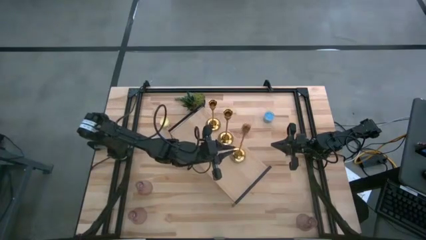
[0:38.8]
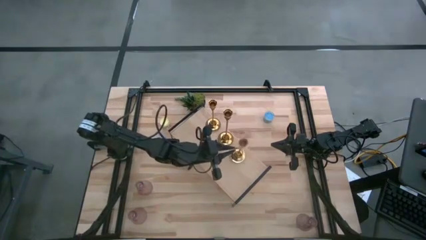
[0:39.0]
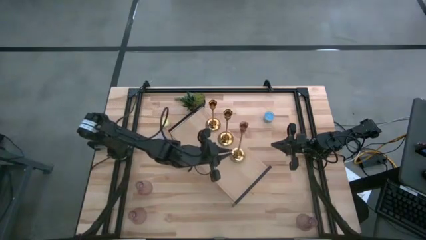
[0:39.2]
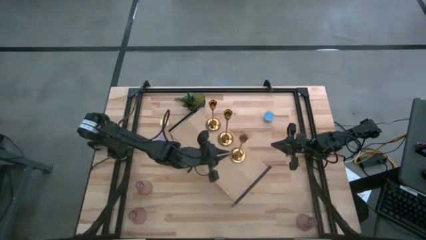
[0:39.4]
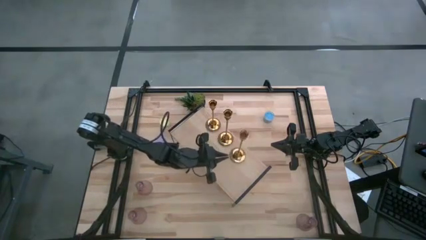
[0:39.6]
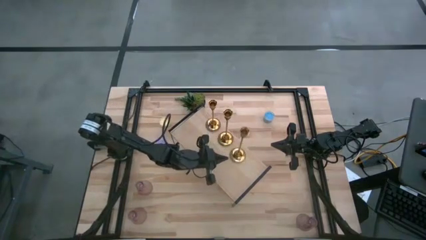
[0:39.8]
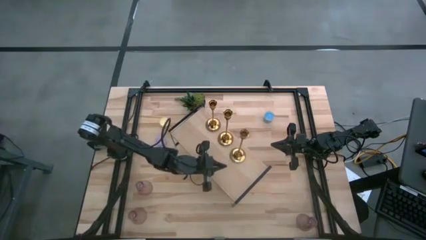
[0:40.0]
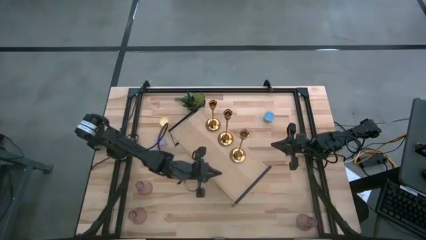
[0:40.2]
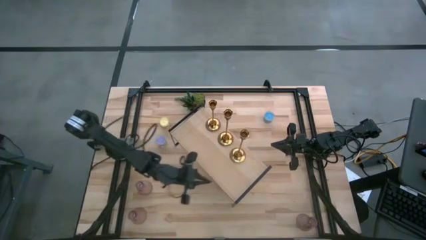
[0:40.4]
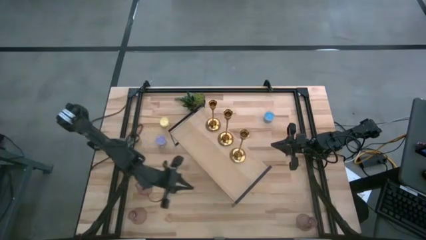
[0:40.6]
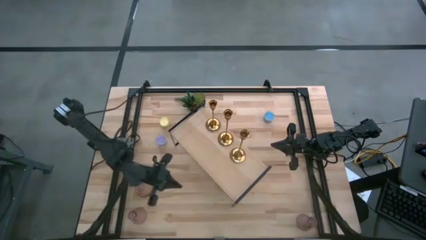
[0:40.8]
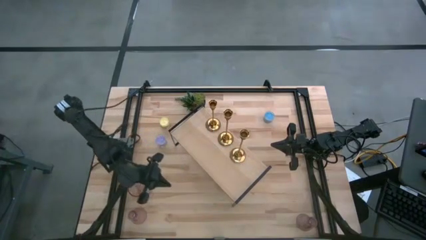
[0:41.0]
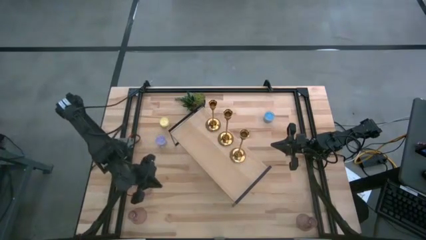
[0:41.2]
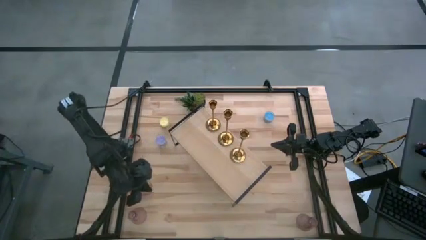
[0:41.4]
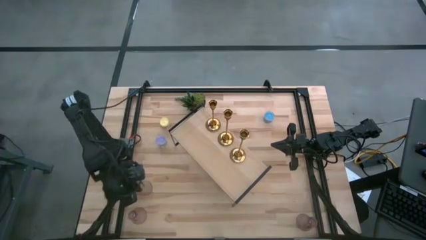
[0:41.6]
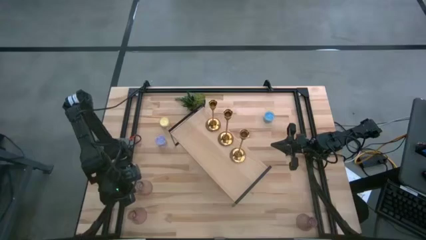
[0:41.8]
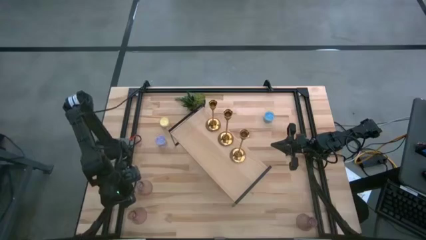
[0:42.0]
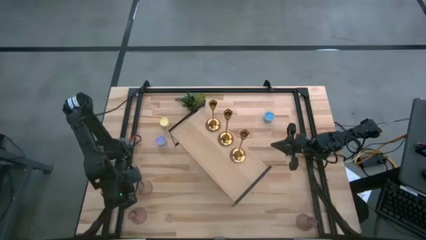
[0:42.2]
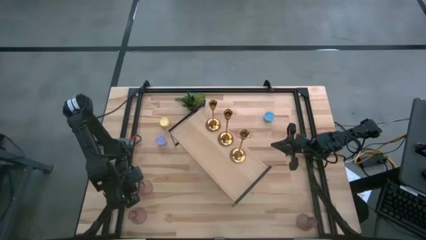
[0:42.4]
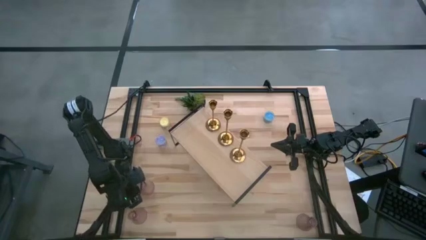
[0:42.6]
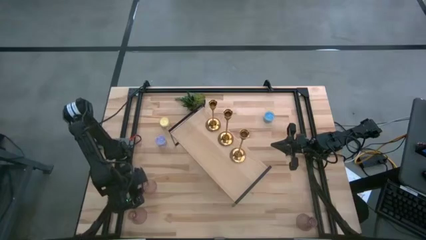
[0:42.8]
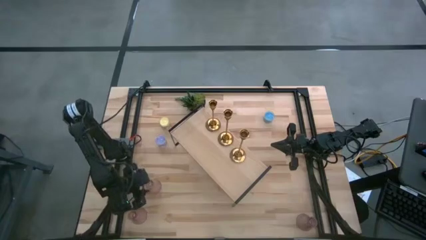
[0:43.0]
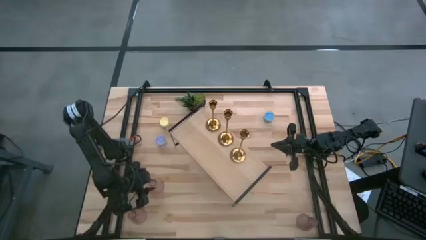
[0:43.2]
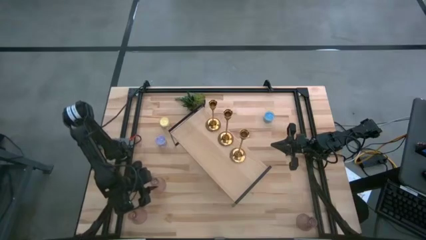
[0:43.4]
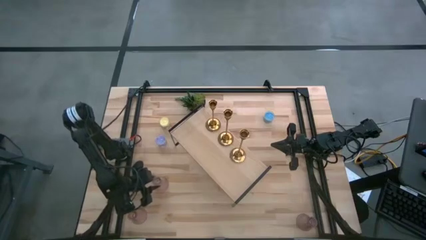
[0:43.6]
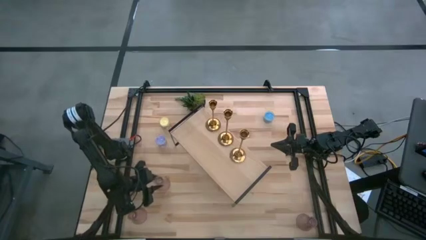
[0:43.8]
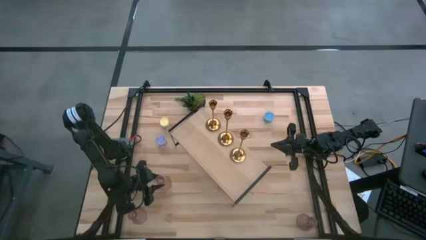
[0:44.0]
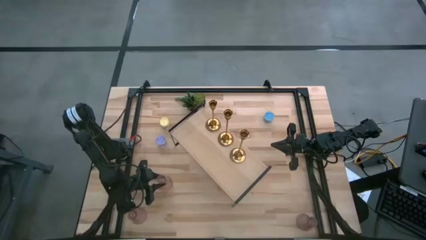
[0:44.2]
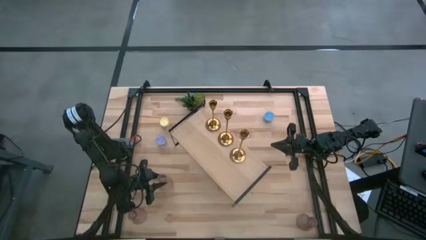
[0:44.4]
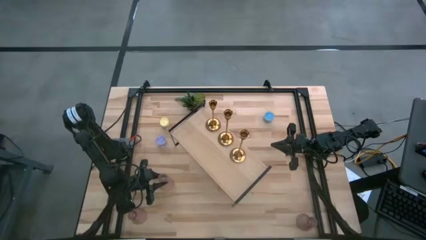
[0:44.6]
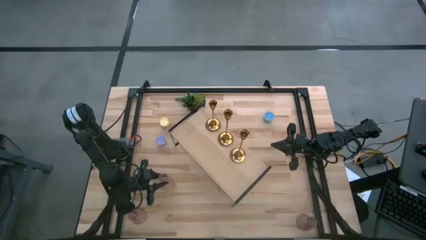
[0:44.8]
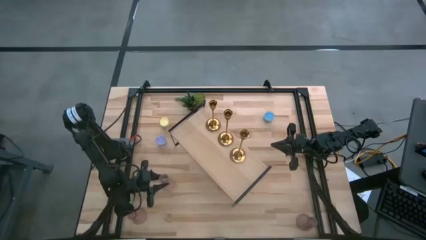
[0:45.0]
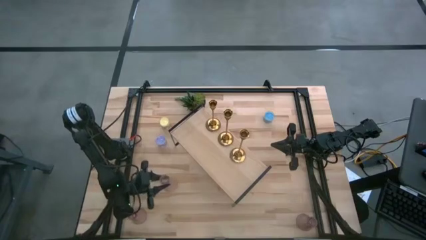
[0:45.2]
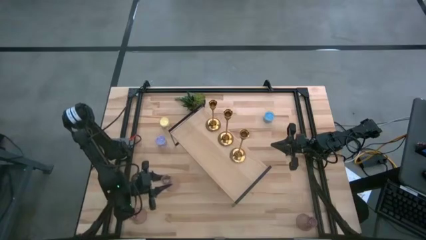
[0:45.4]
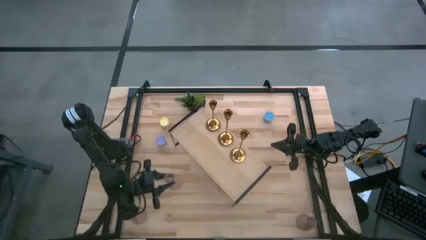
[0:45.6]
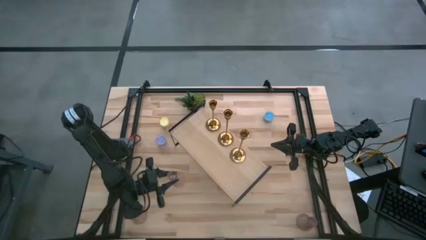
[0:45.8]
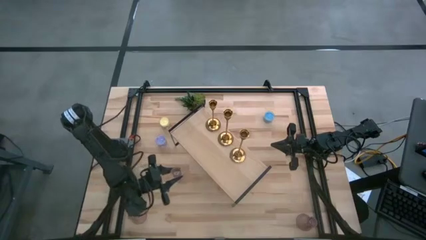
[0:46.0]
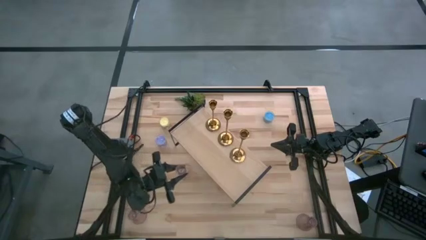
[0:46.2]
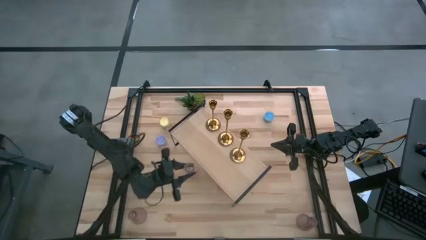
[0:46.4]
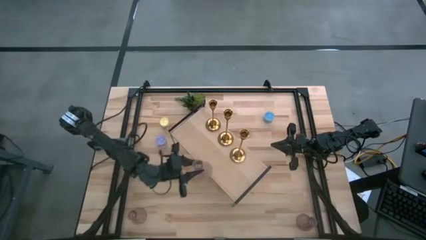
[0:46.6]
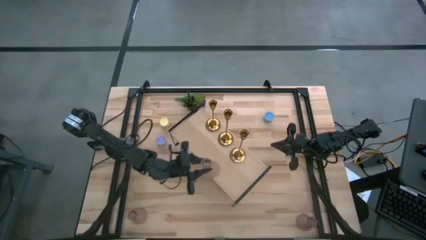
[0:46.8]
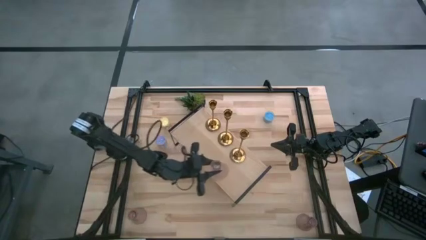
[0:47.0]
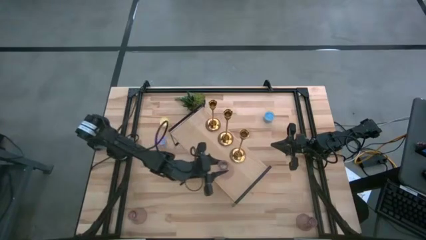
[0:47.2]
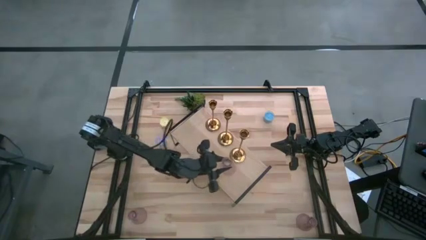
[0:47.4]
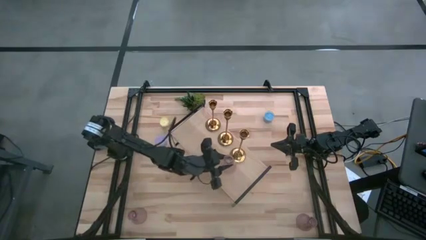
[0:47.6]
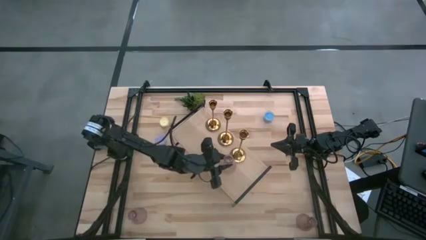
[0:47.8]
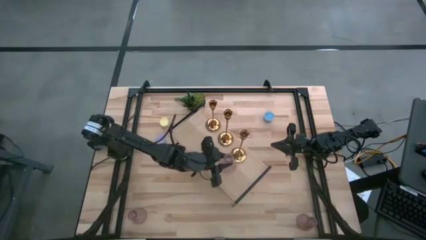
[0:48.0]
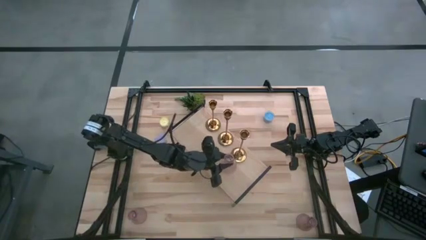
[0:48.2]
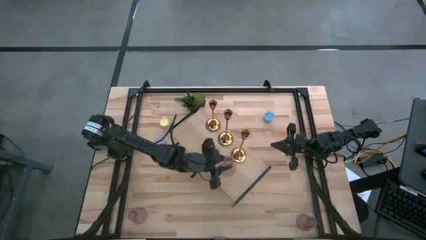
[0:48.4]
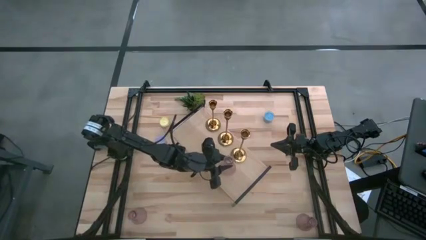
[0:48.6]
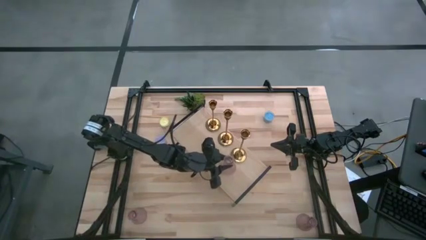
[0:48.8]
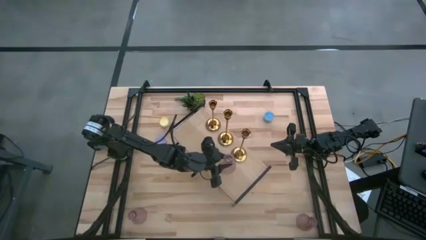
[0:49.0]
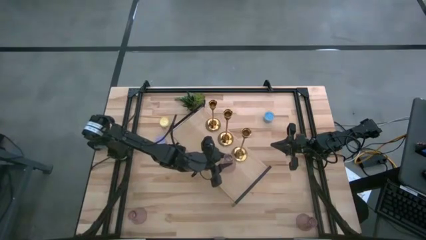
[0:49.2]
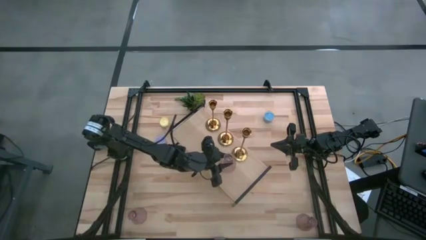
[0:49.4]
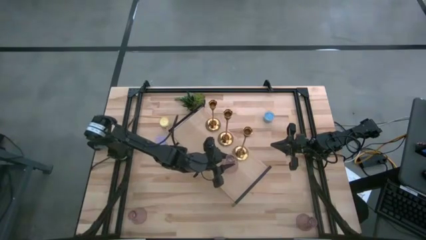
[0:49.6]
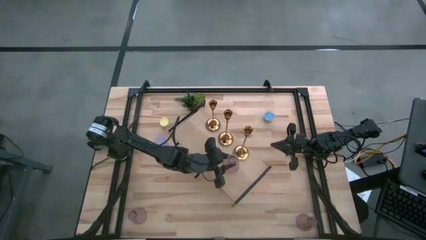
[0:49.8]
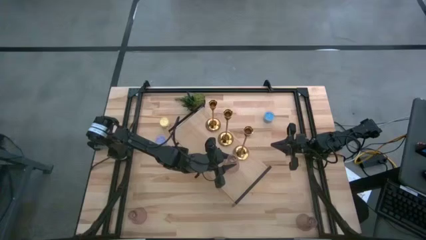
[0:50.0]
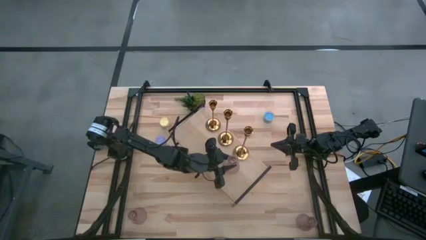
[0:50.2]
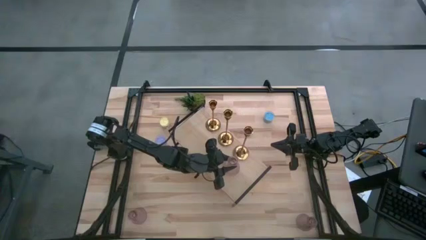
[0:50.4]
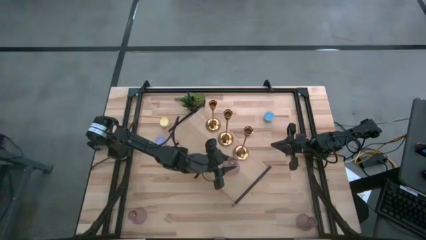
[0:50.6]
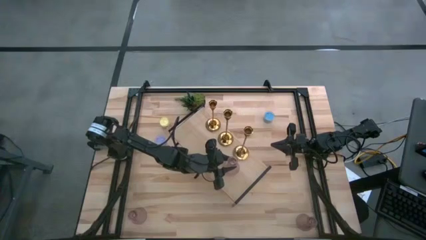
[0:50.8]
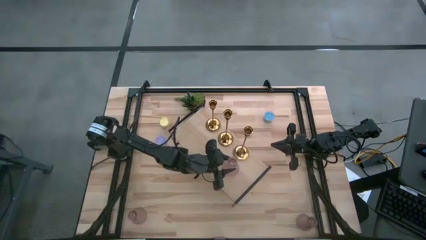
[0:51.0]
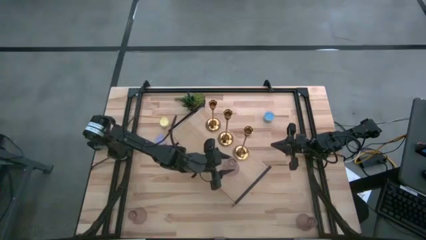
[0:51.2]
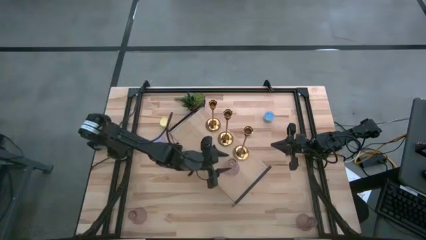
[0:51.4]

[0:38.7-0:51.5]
Task: Pick & Place candle stick holders
Put the top left pink glass candle holder on the shelf

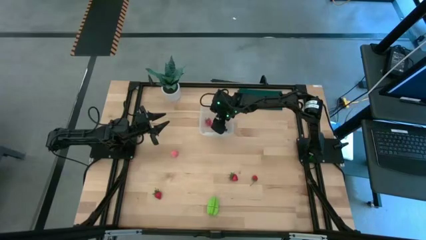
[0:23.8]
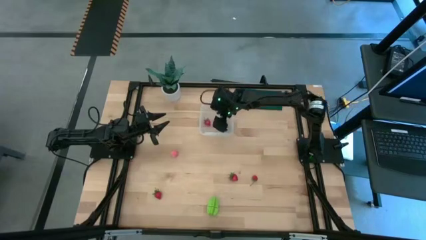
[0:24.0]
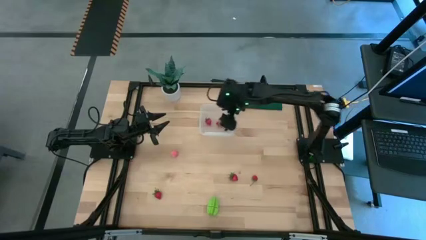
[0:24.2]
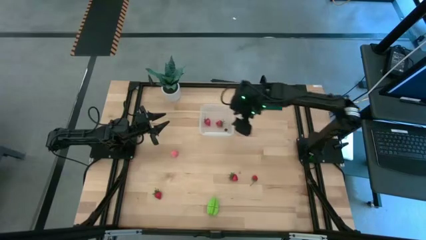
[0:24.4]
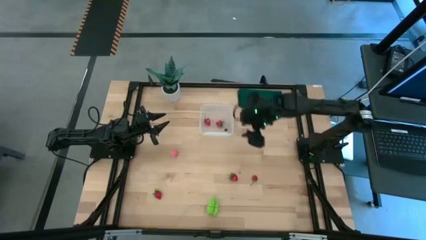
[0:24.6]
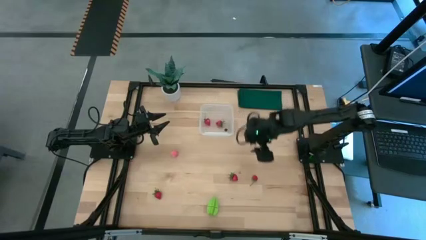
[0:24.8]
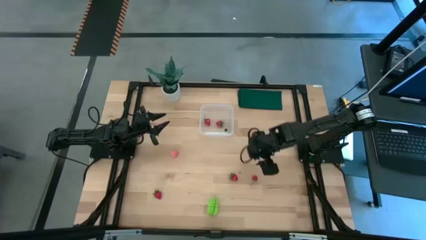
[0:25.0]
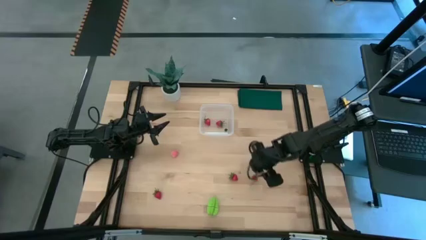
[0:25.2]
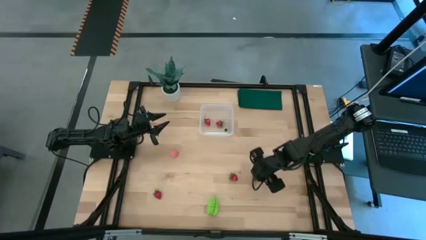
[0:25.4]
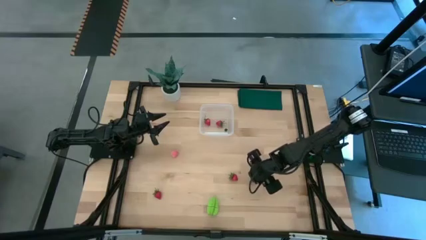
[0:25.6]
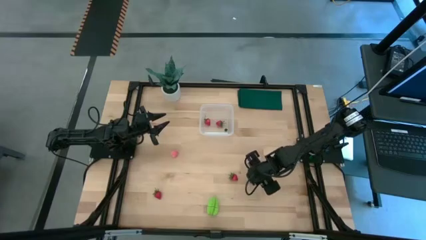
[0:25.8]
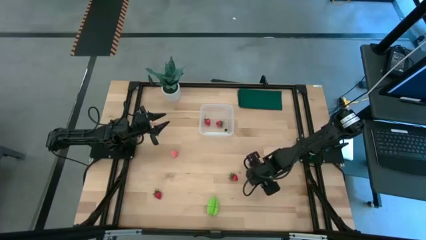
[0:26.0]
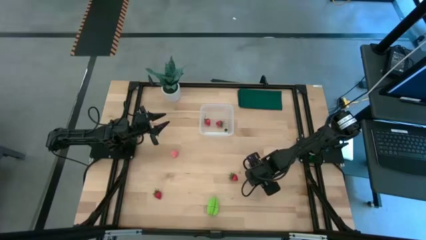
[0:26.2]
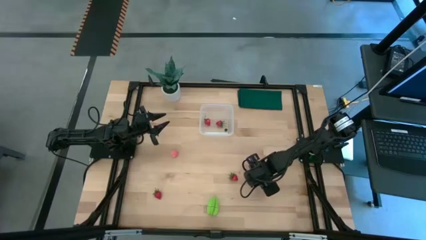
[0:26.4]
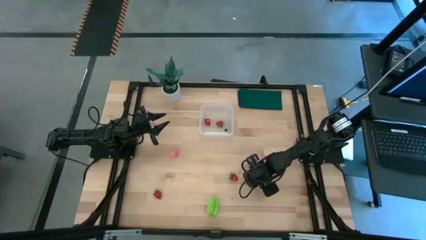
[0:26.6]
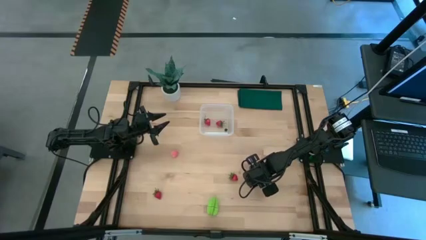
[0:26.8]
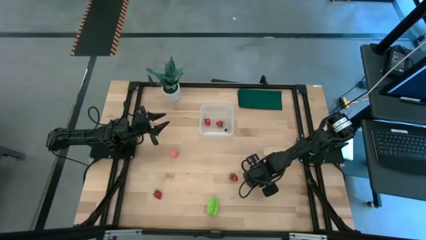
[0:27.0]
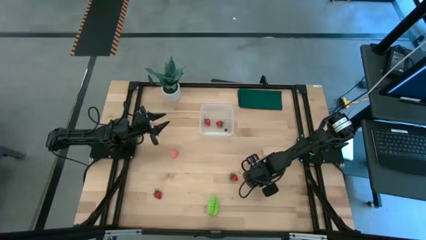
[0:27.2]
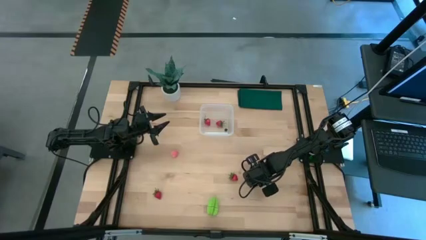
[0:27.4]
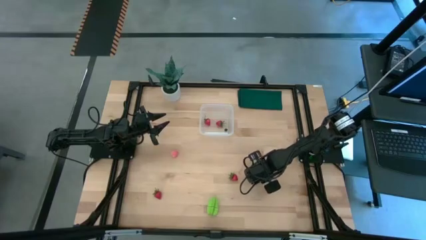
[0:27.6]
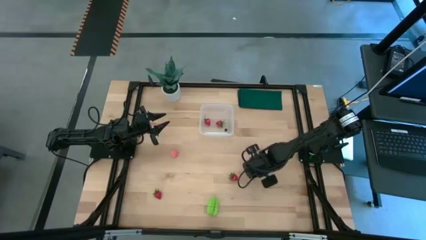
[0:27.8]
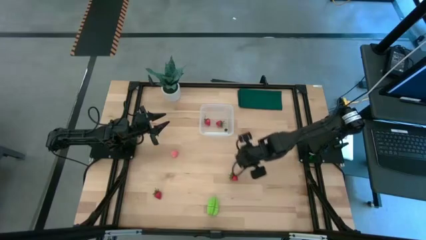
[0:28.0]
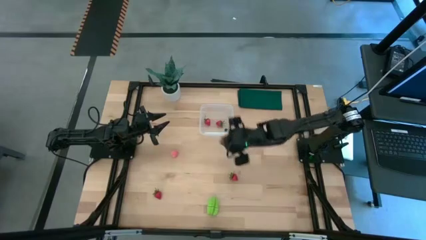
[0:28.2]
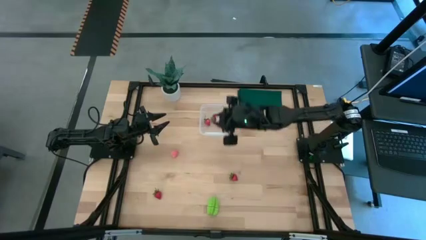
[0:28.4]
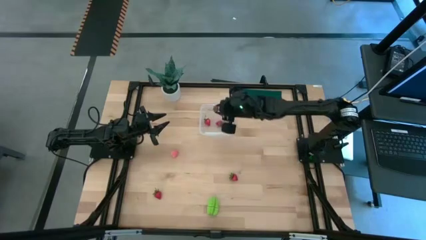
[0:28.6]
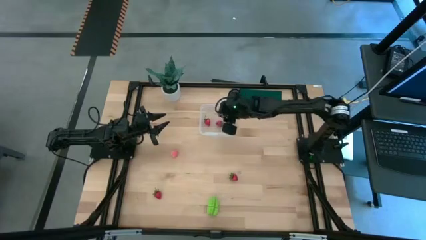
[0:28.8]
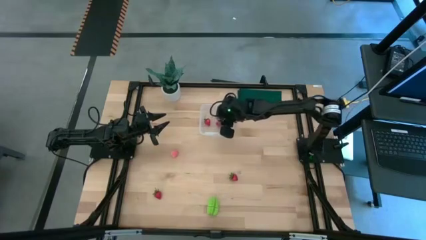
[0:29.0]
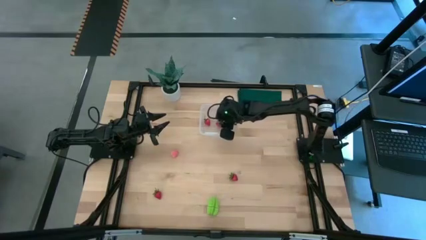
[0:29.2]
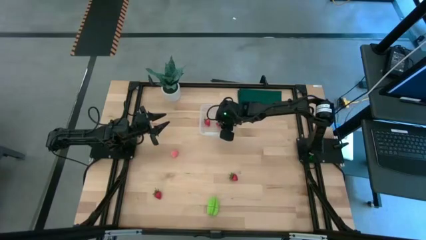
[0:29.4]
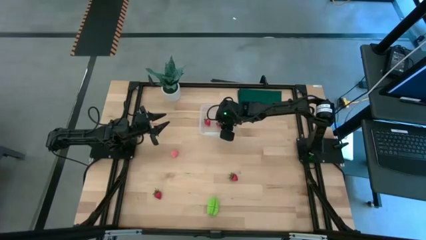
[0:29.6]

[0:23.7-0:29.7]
Task: Pick and placing Produce into tupperware
Put the strawberry into the transparent container
